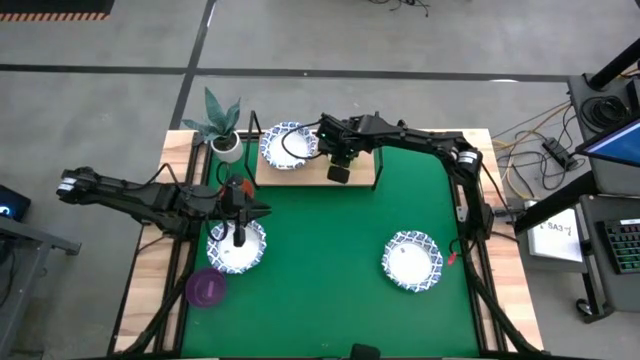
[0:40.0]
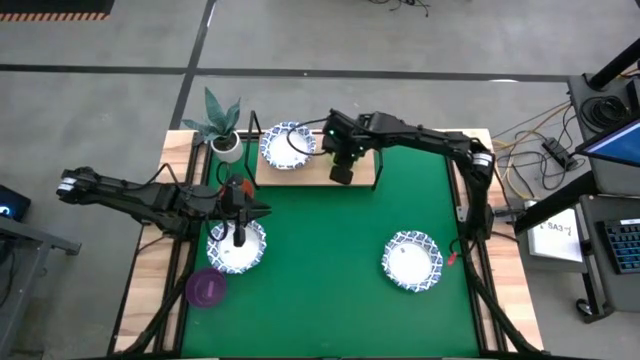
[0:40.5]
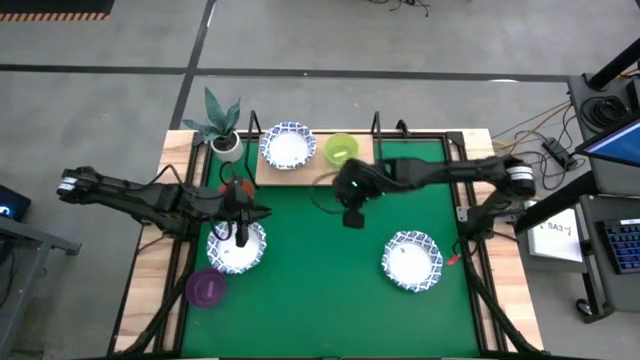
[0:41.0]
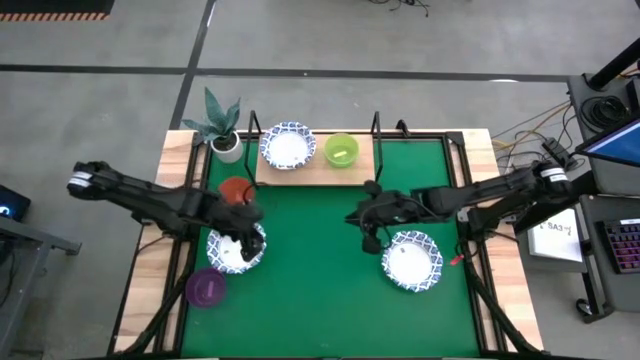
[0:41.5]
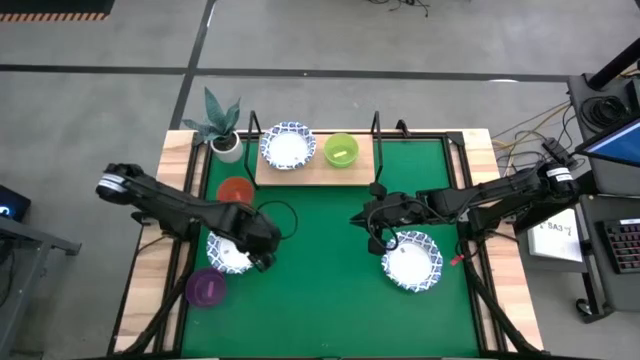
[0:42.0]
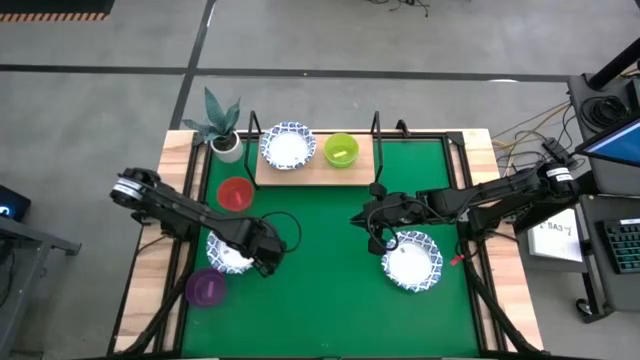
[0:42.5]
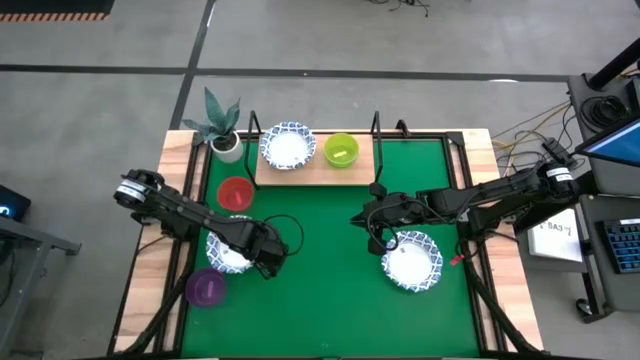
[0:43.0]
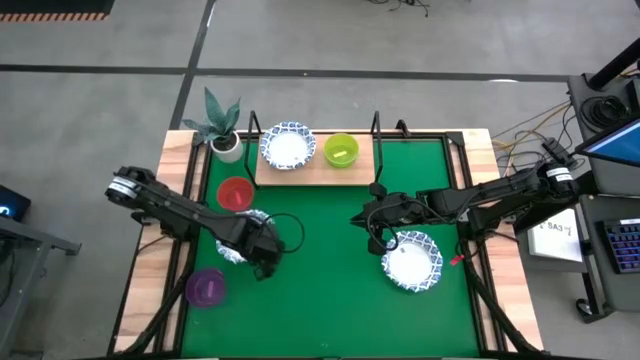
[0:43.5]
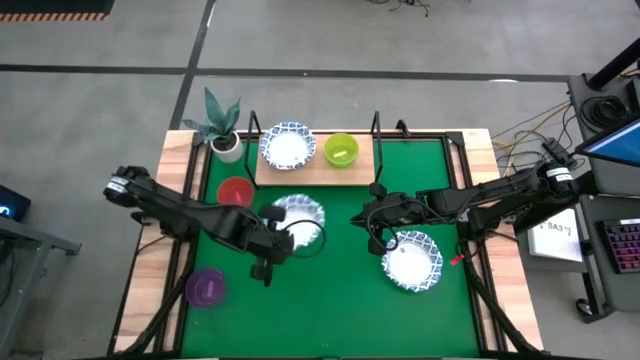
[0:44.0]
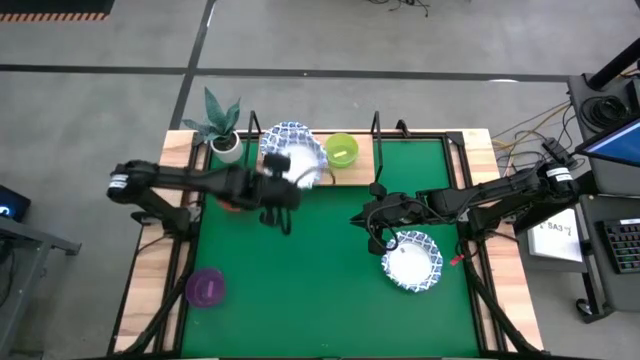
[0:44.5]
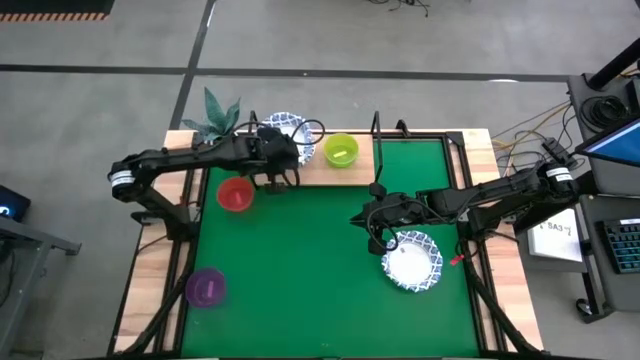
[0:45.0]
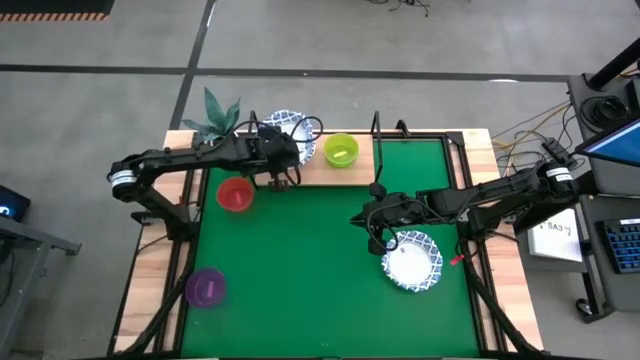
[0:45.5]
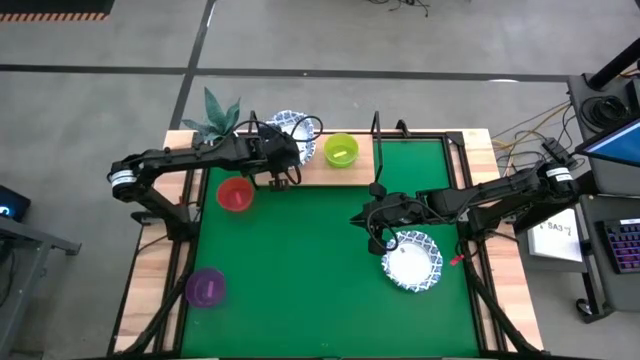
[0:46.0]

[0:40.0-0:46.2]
Task: Place and stack bowls onto a shelf
Stack the white patterned bowl on top of the white patterned bowl on the shelf

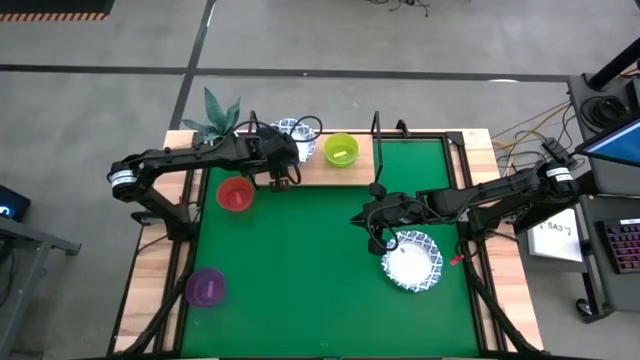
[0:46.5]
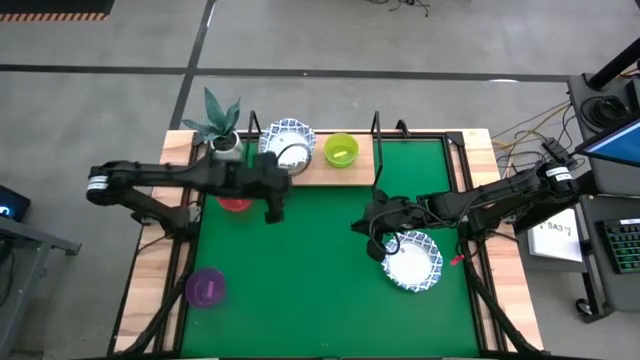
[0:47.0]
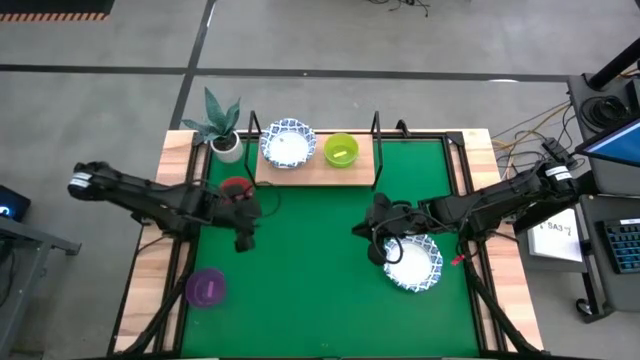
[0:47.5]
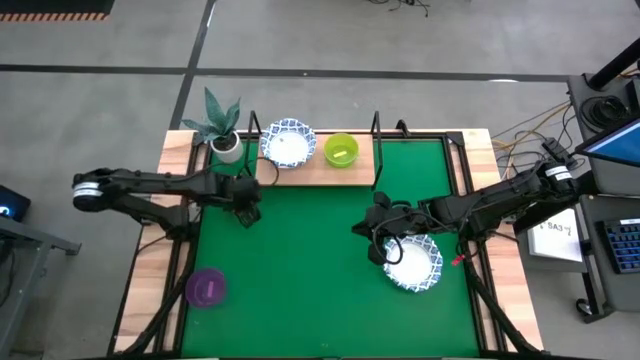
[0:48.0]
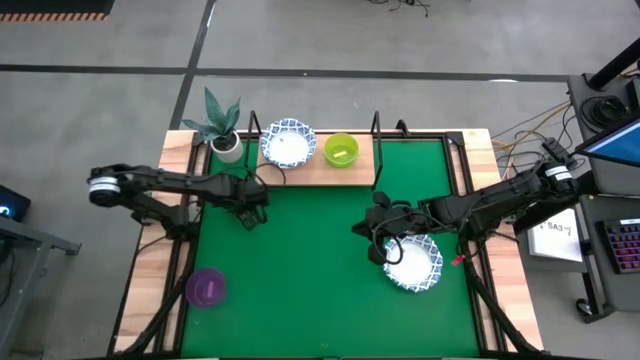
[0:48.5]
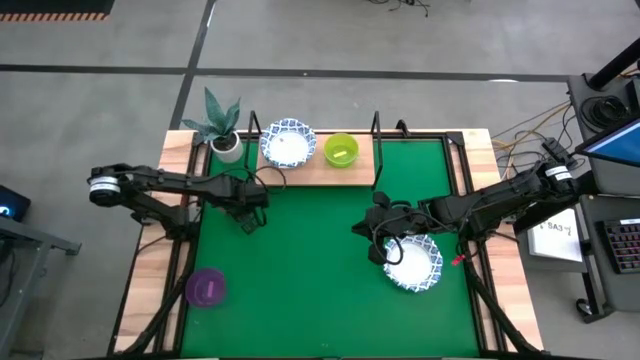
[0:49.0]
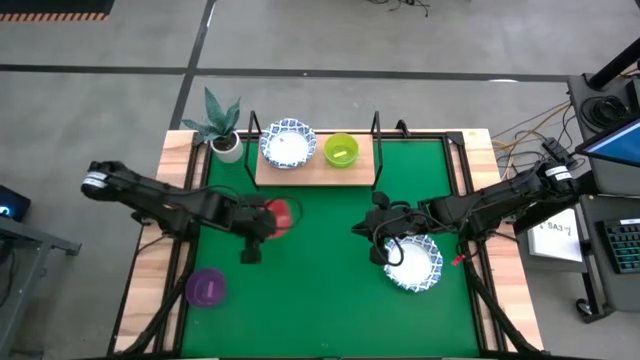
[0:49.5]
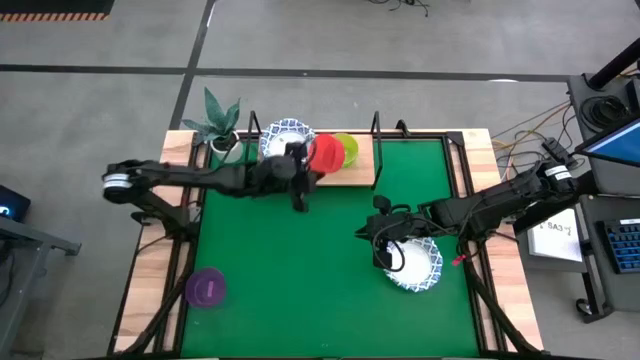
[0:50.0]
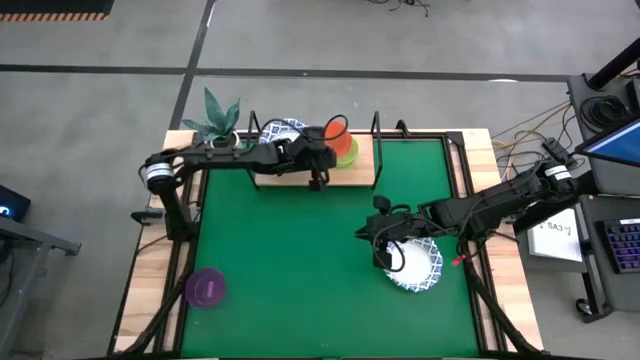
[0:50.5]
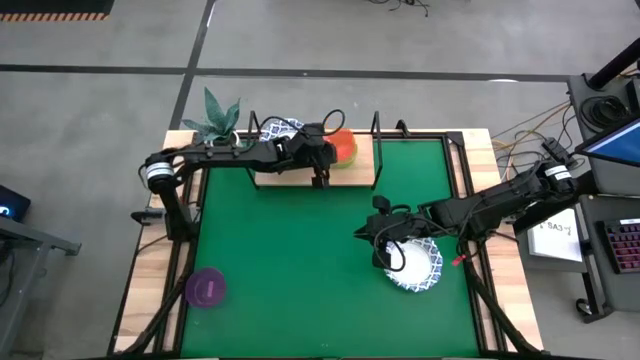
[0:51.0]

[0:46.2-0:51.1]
Stack the orange bowl on top of the yellow bowl on the shelf

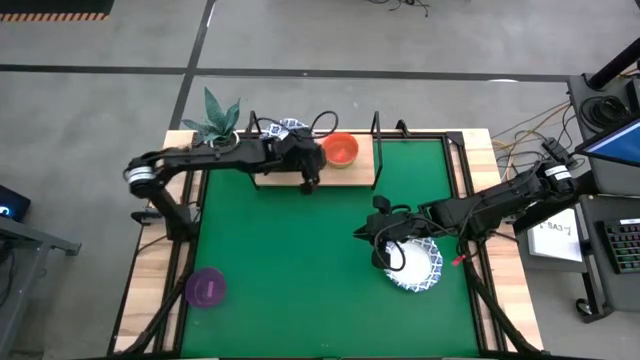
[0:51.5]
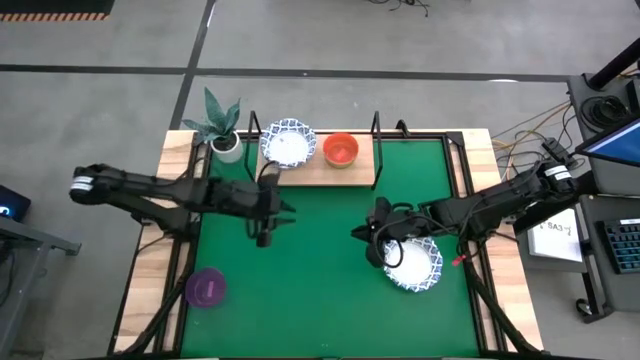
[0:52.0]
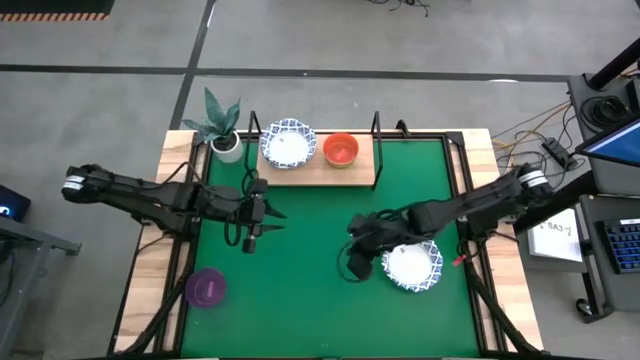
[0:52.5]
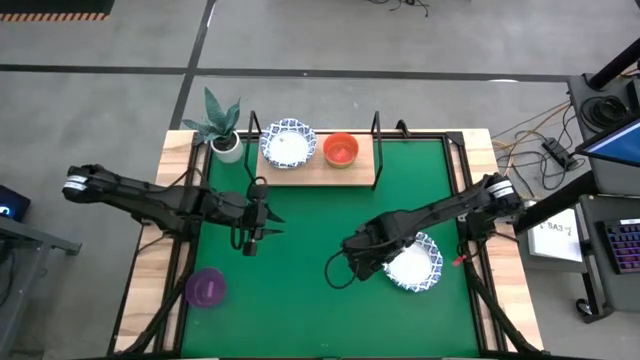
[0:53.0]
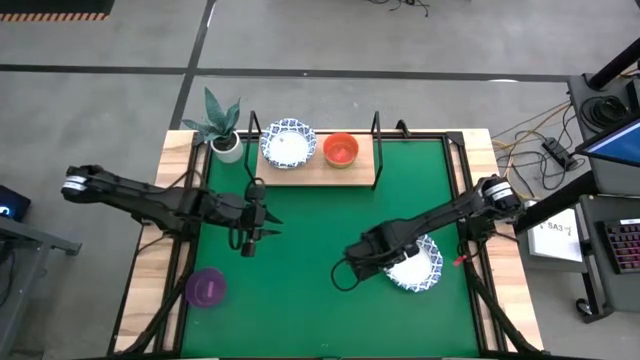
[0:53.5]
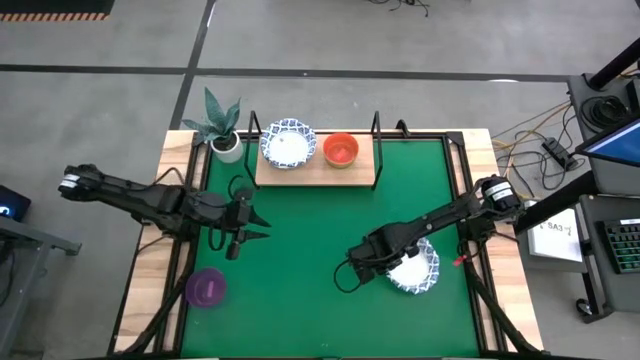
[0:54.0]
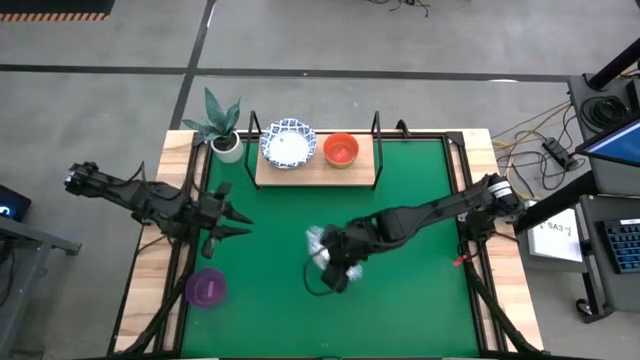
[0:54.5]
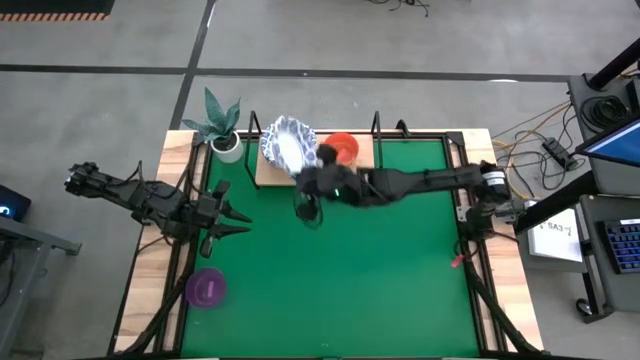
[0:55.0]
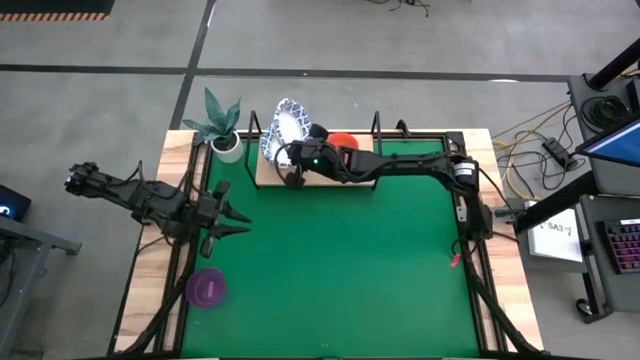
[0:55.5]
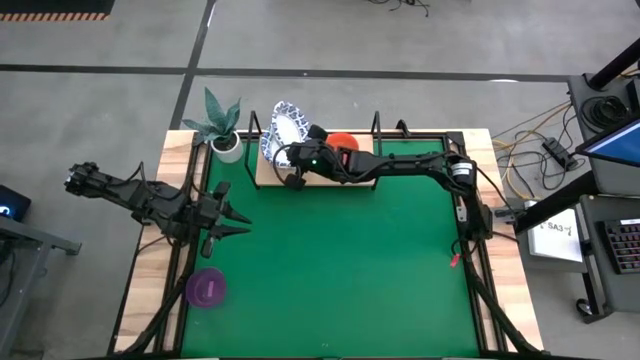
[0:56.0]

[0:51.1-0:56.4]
Stack the white patterned bowl on top of the white patterned bowl on the shelf

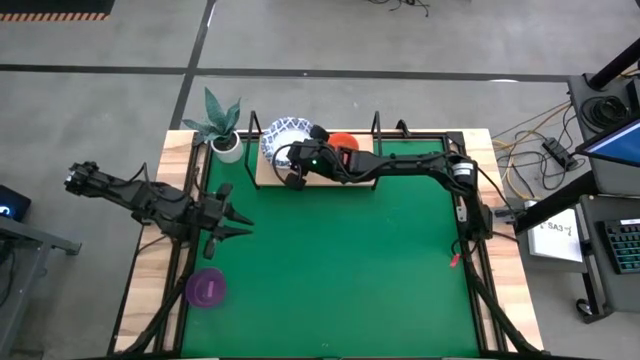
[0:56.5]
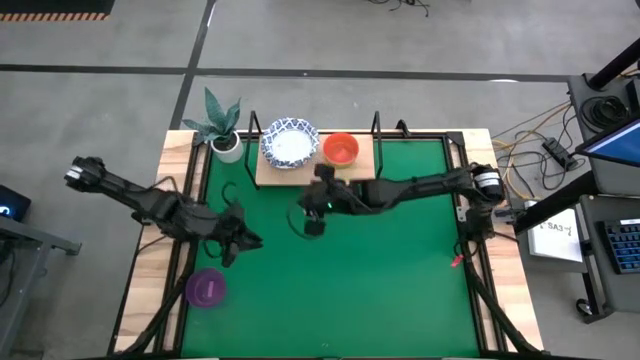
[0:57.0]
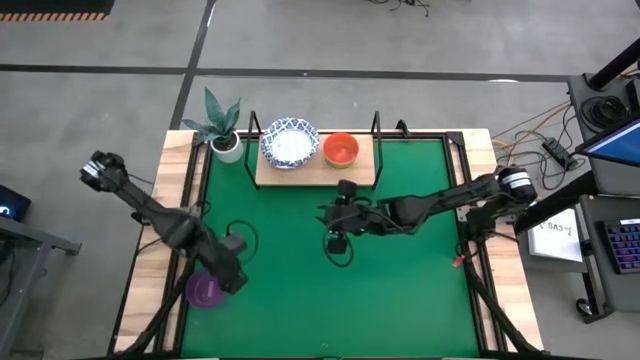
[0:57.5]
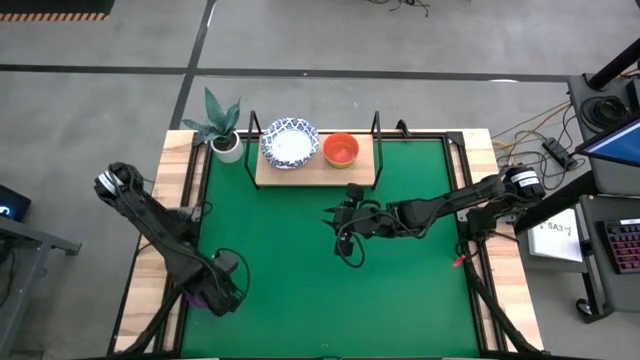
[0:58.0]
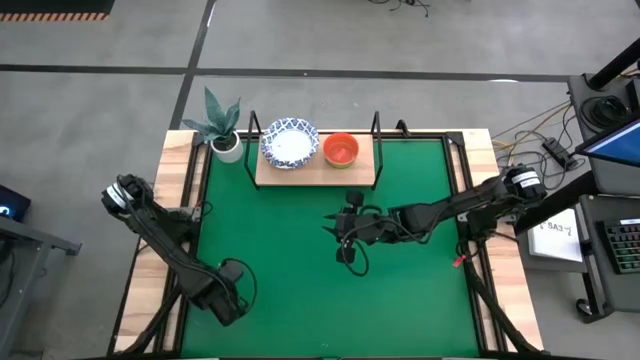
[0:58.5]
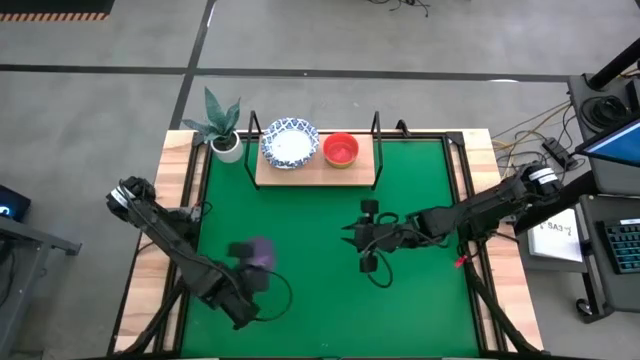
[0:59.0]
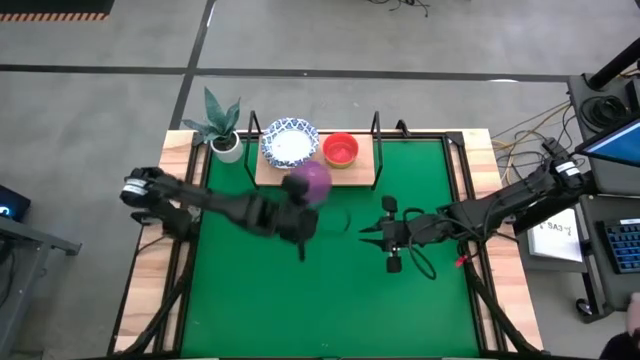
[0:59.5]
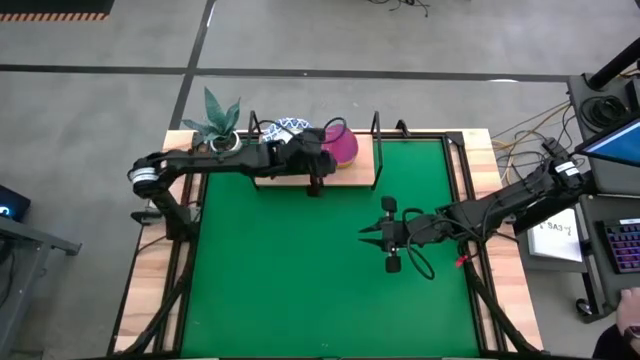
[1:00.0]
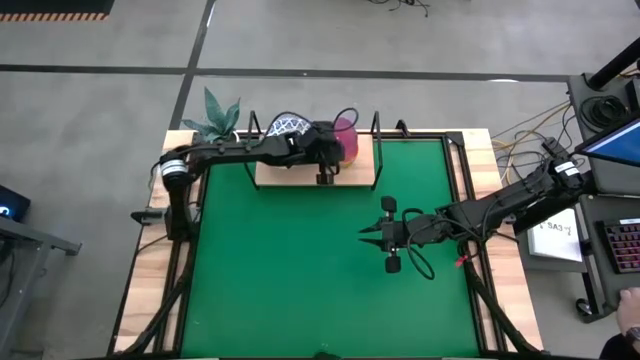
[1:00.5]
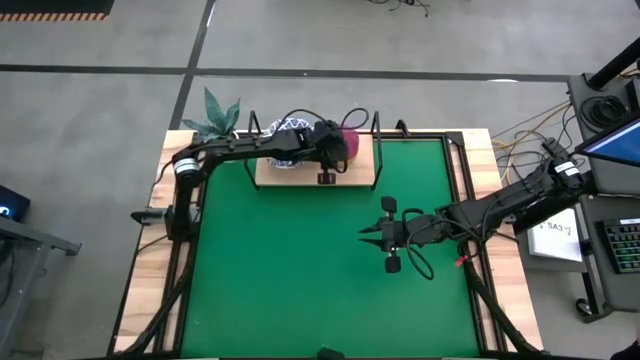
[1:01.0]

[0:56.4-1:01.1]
Stack the violet bowl on top of the orange bowl on the shelf
